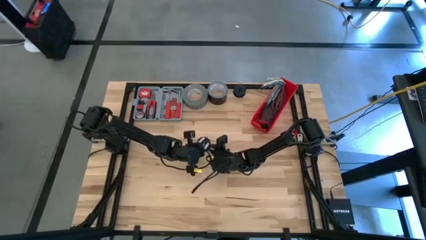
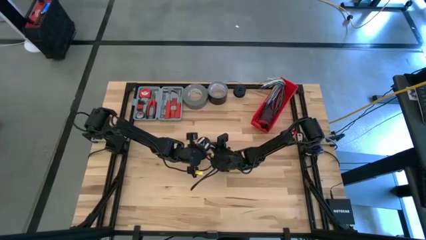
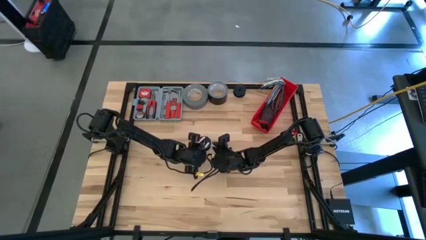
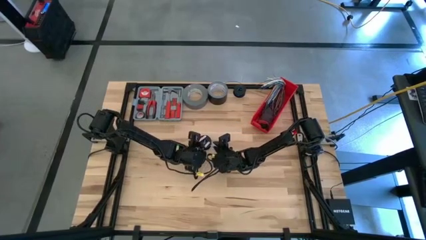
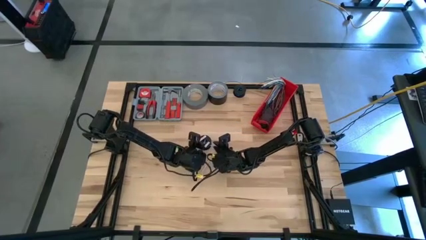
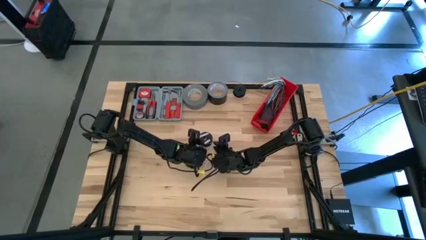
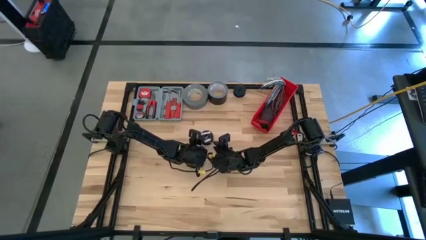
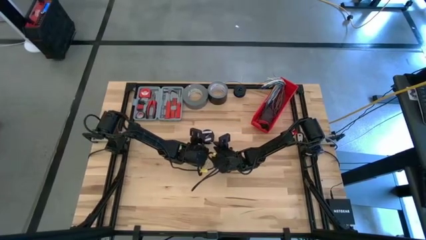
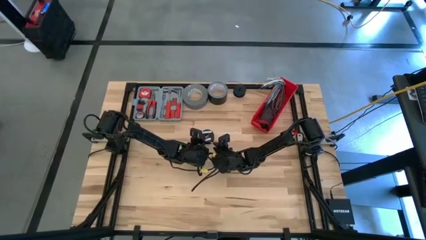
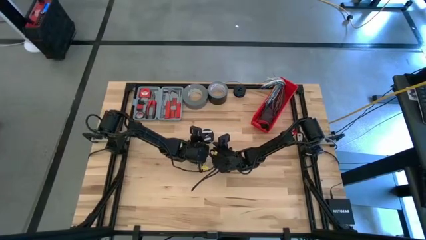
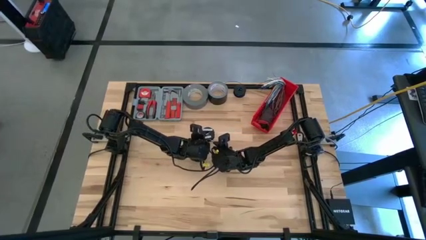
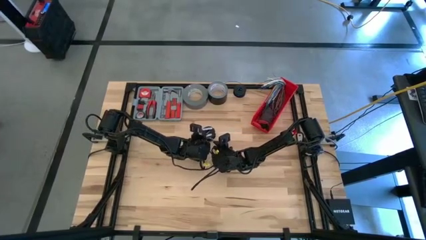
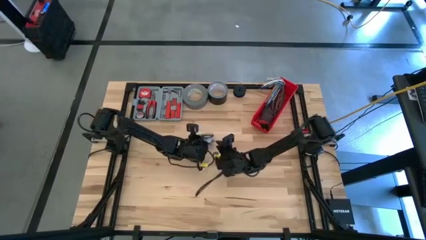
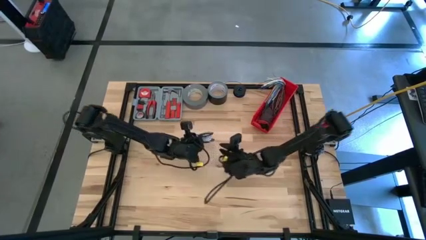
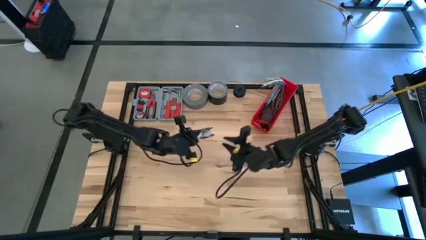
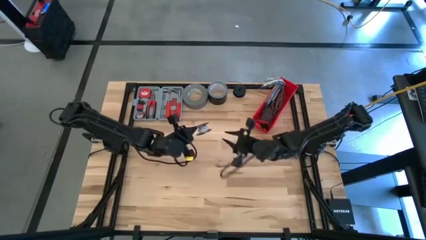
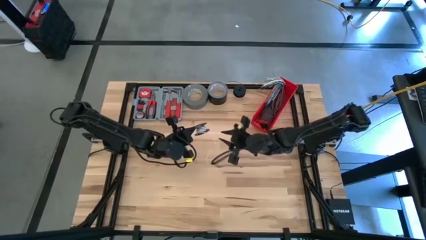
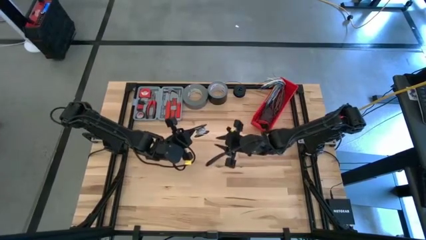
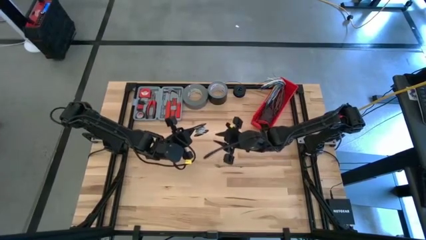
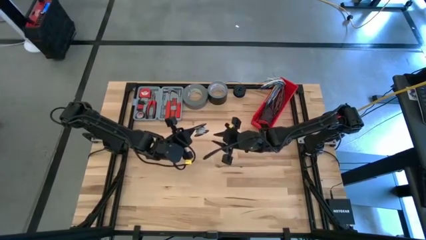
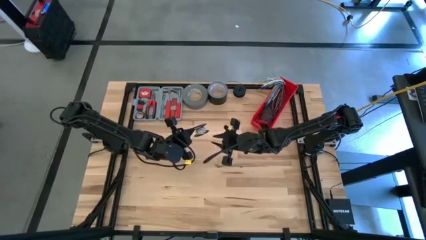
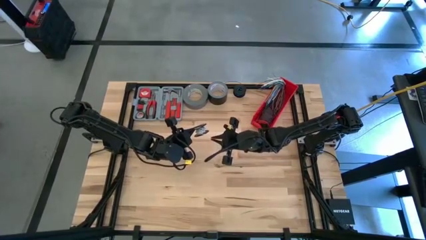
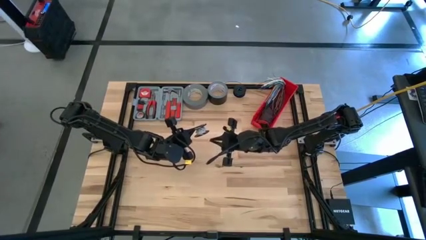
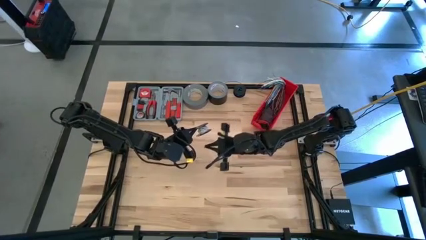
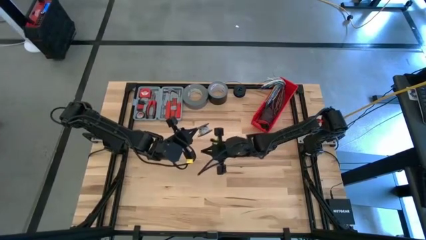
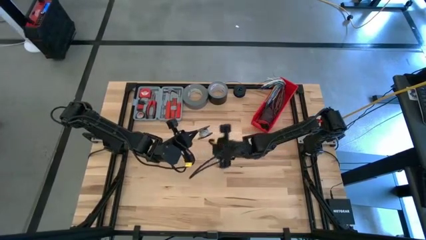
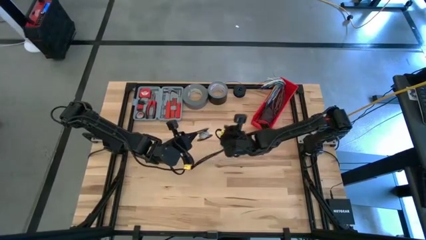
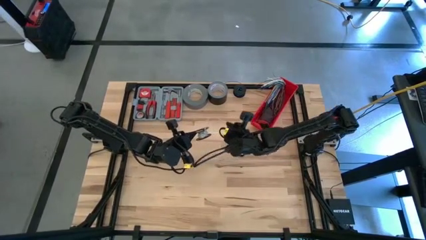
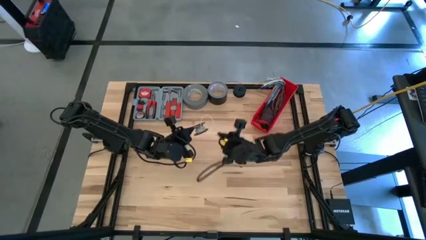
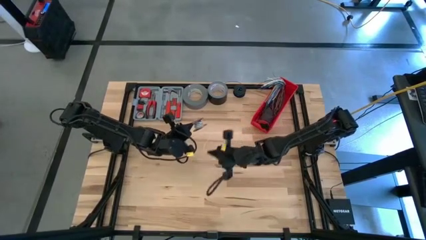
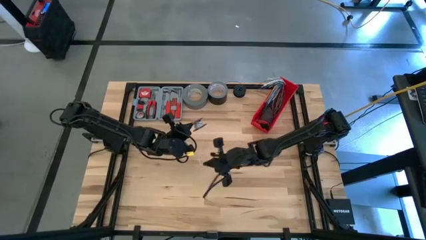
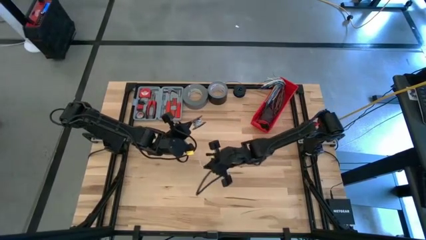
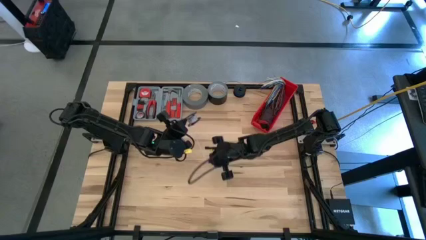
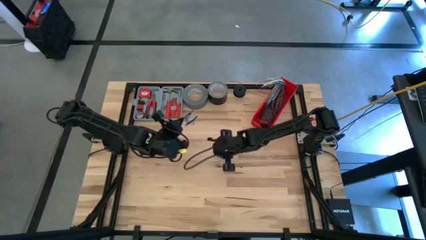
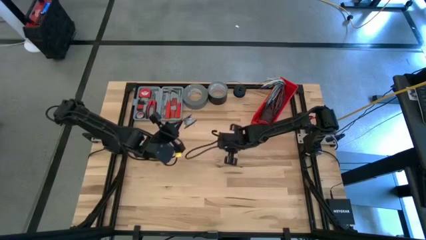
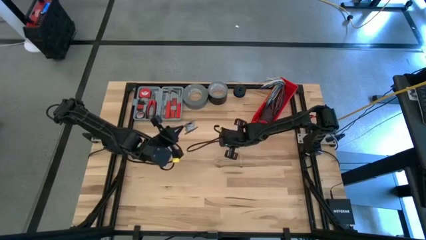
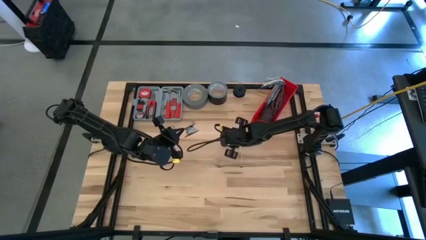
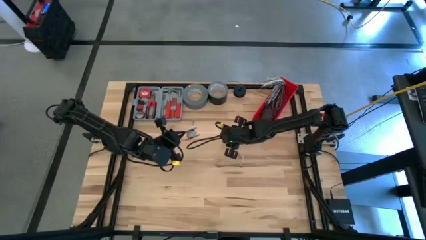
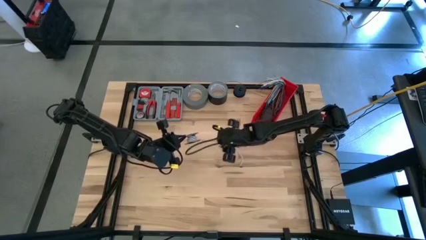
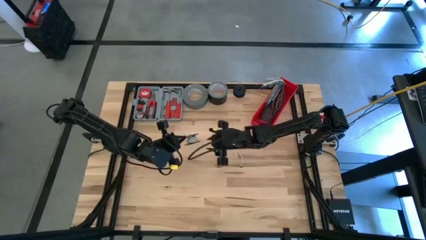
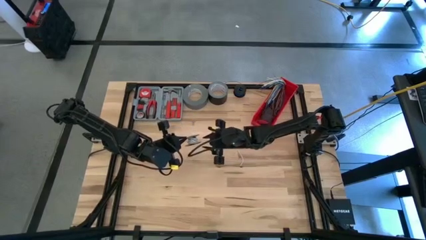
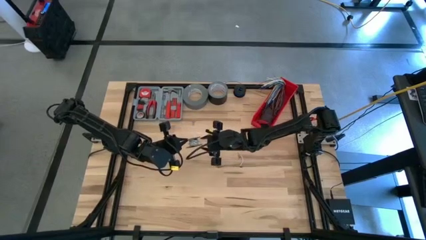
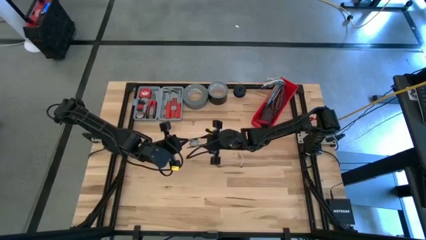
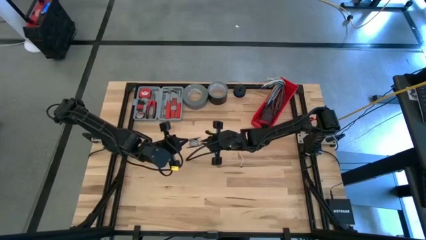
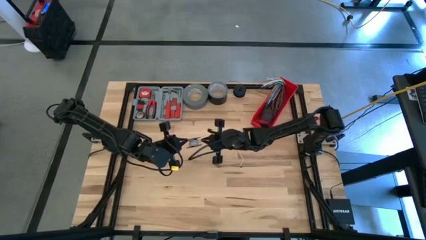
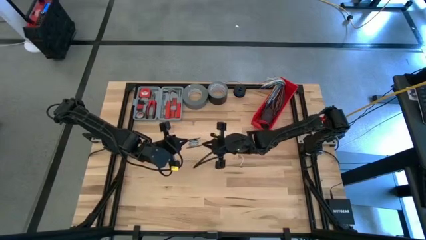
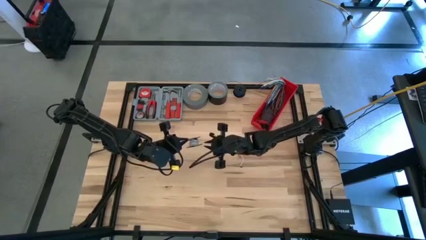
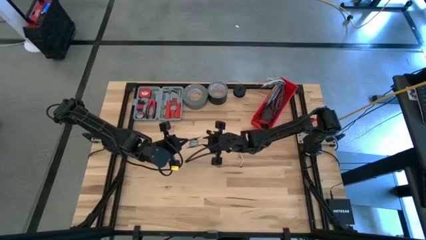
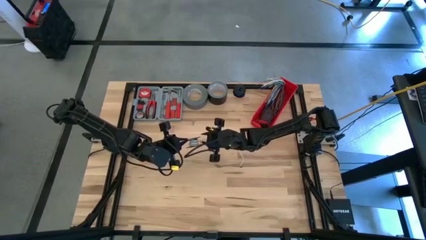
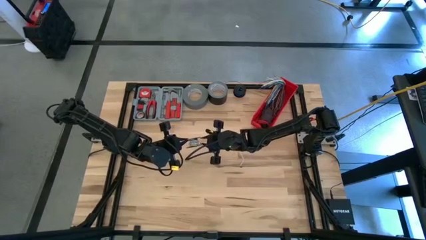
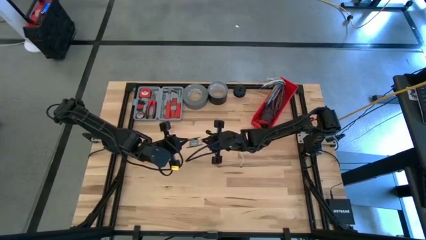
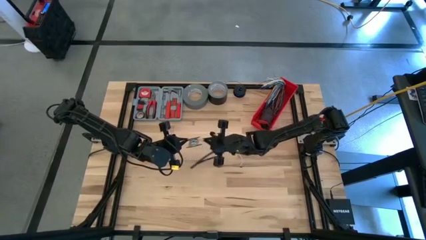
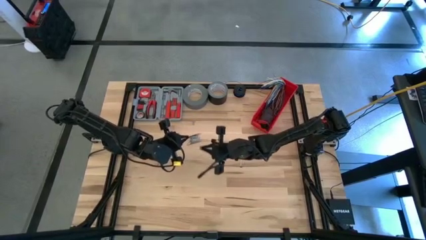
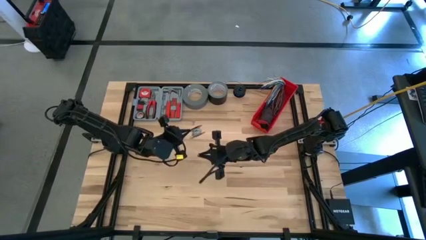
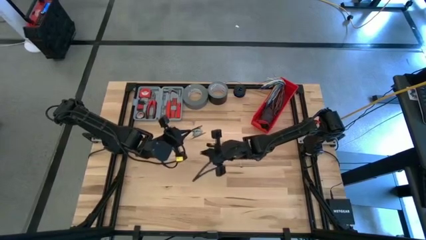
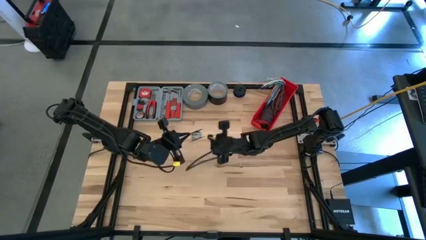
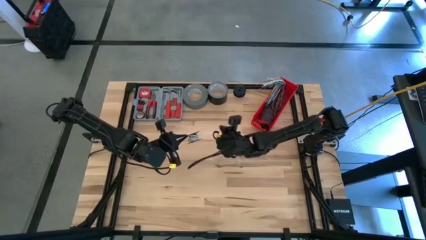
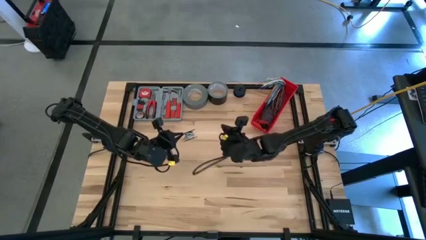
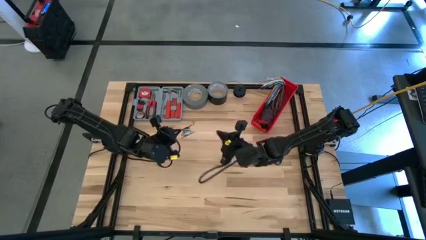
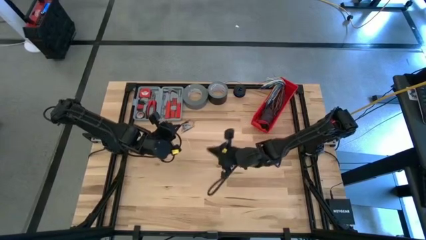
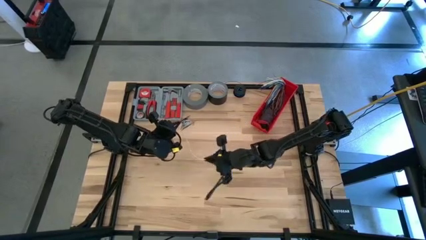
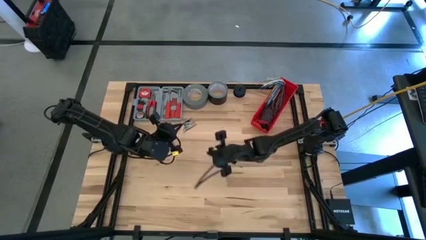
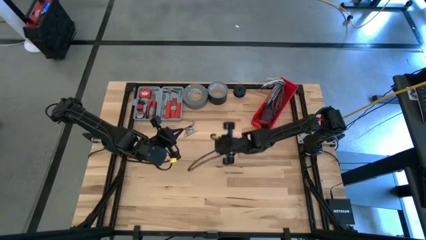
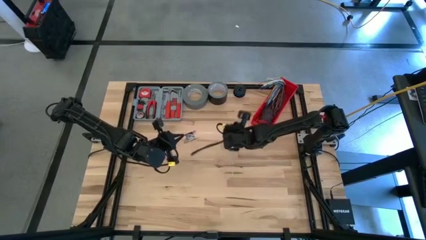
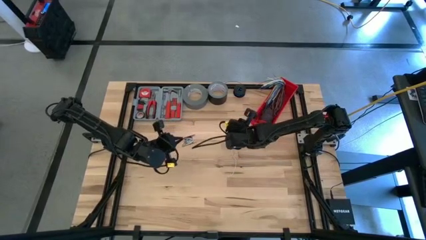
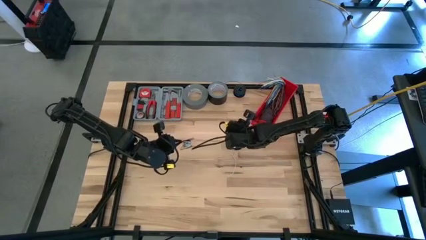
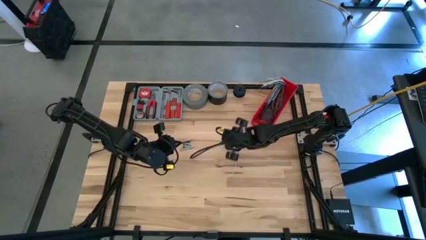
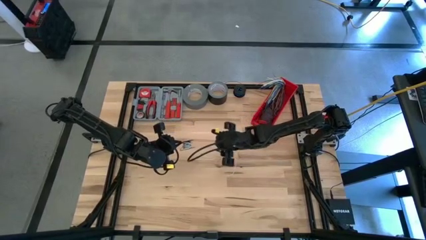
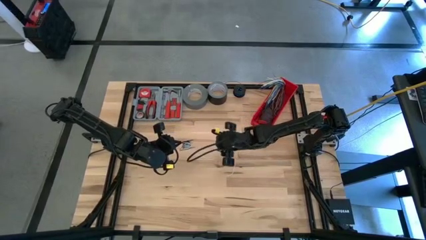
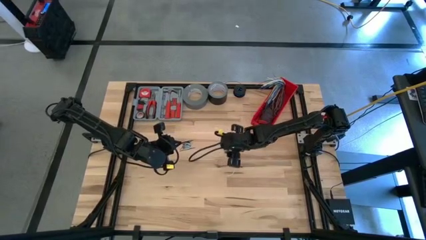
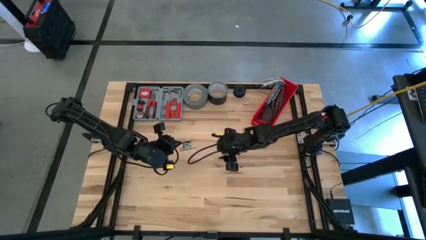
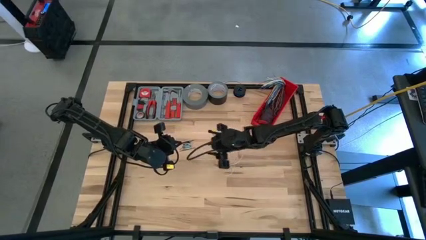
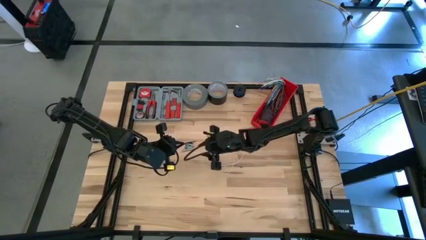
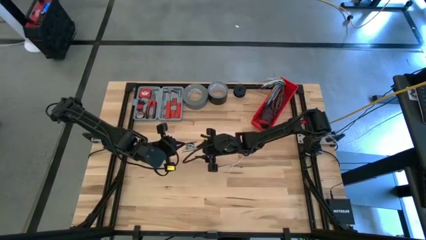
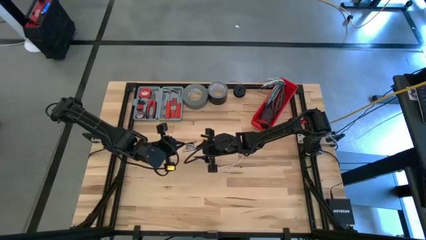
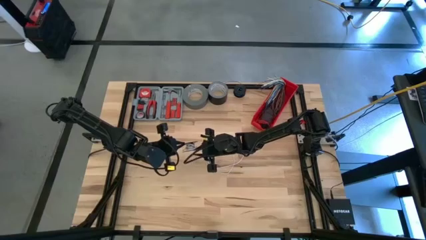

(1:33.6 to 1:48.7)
Task: Coil cords
Uncoil the white wire from the spool
